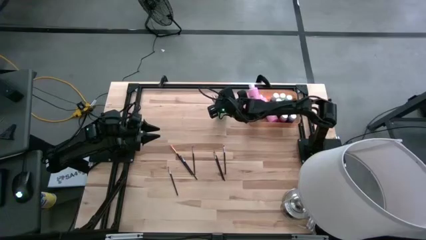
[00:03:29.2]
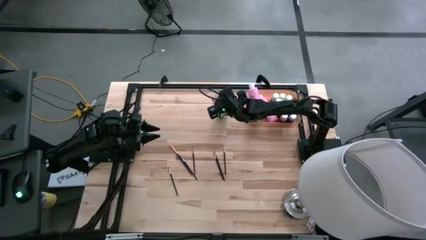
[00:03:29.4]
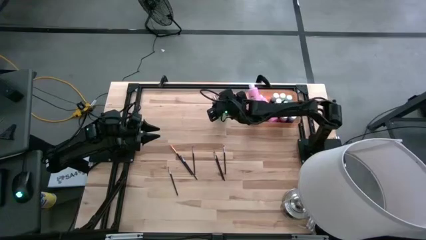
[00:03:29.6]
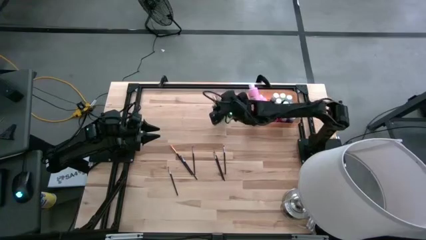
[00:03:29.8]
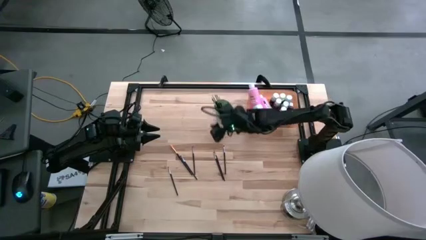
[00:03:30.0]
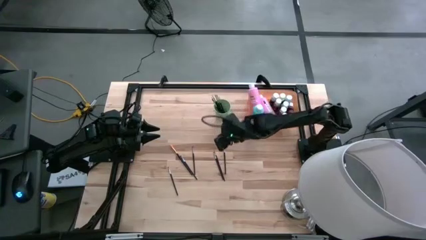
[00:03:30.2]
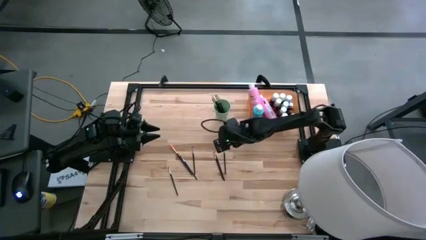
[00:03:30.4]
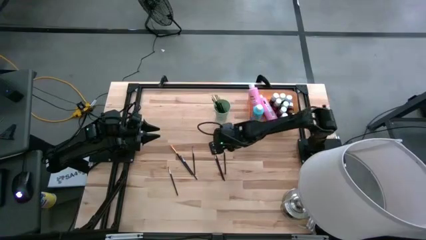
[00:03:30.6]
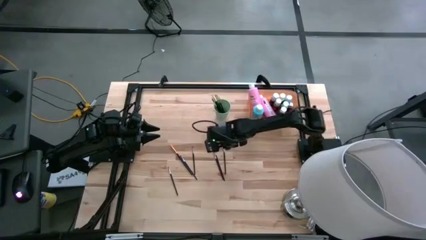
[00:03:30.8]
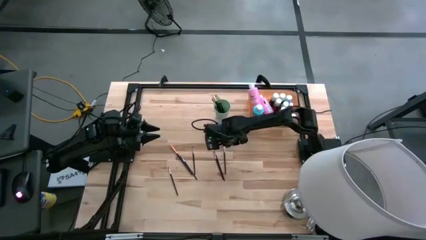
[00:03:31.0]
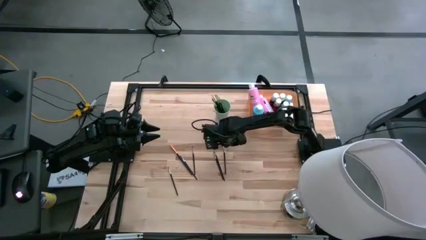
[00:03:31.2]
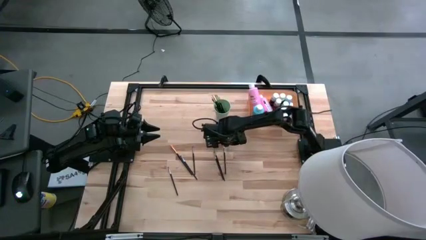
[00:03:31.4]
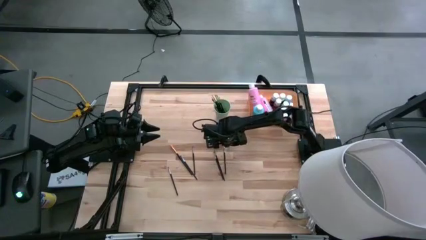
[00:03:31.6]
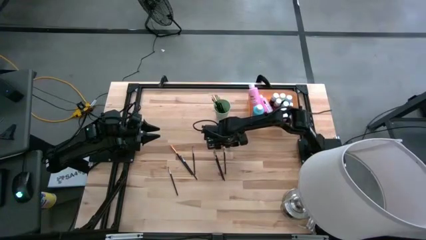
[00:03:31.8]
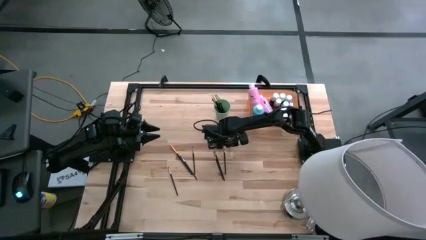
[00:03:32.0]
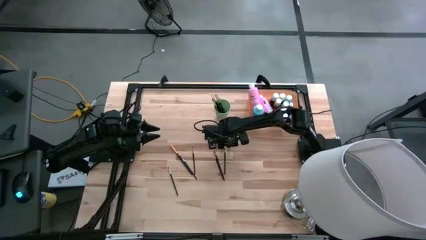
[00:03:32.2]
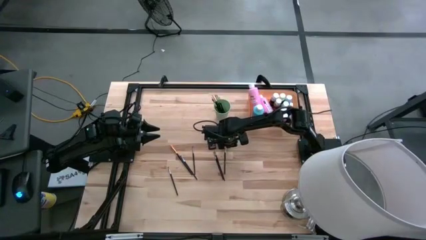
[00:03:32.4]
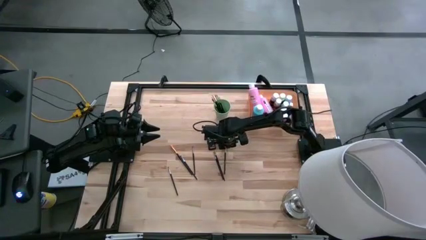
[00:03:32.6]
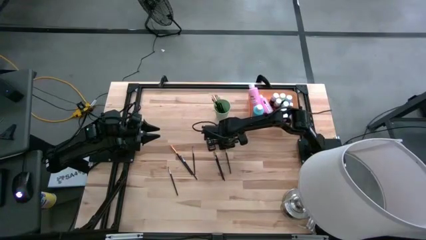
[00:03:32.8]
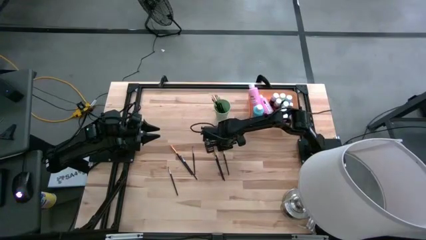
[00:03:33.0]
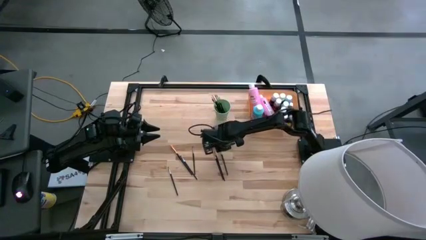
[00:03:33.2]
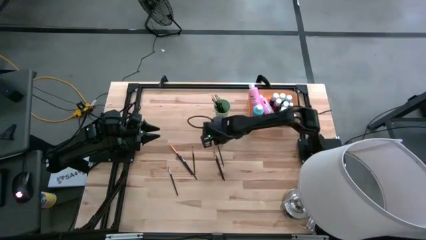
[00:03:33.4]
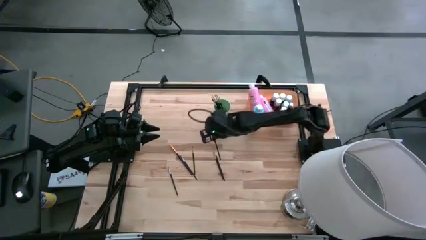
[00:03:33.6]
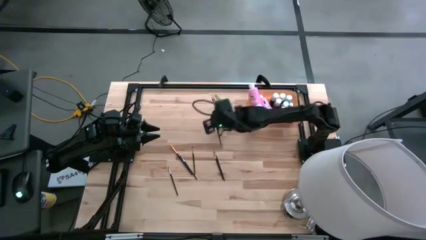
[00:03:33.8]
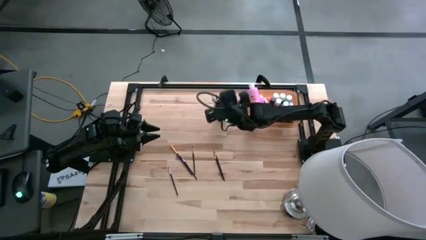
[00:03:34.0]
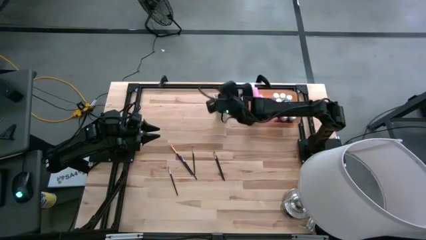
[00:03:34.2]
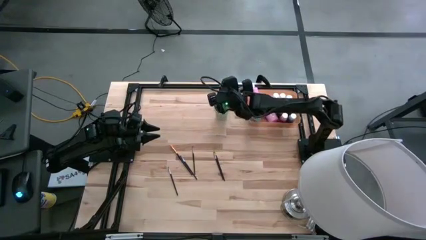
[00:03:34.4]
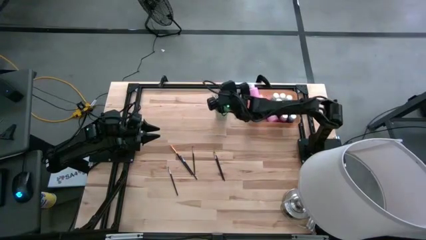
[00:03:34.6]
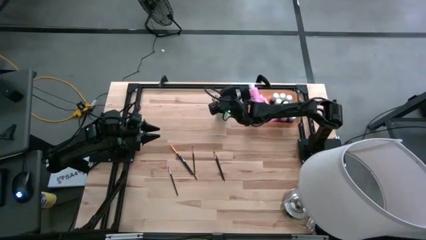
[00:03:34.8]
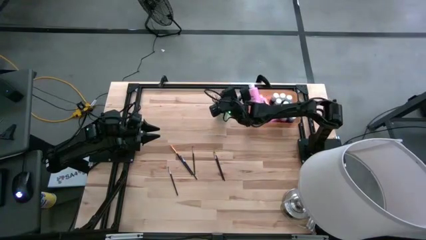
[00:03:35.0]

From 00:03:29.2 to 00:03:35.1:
Task: Pick & Place Paint Supplies
Put the silver paintbrush into the green cup

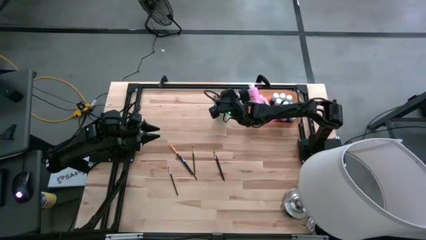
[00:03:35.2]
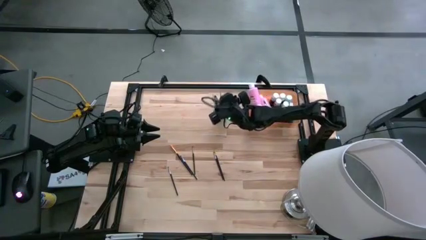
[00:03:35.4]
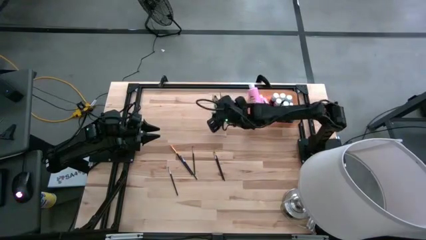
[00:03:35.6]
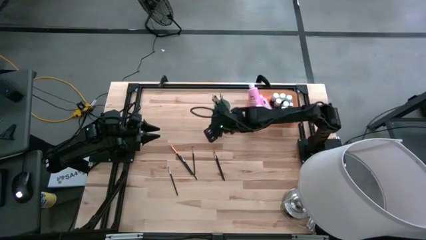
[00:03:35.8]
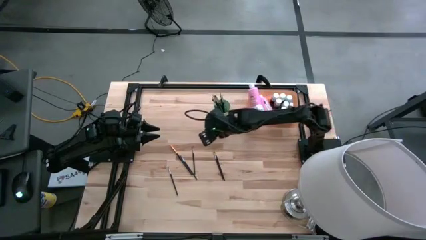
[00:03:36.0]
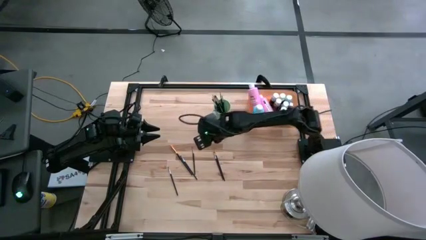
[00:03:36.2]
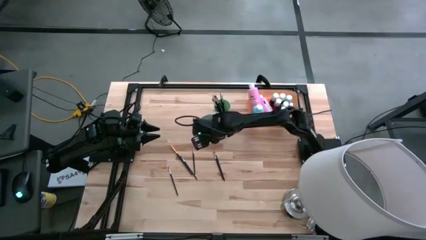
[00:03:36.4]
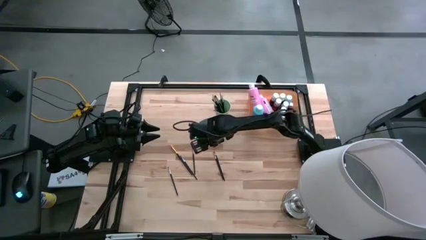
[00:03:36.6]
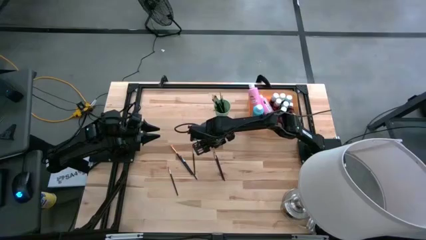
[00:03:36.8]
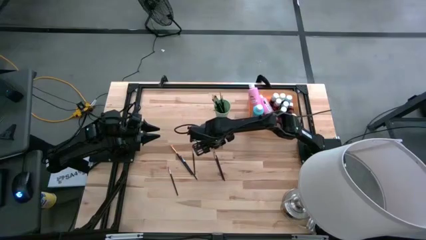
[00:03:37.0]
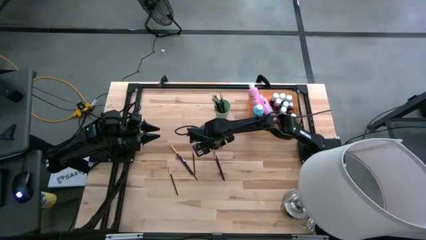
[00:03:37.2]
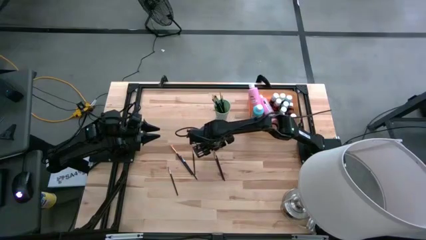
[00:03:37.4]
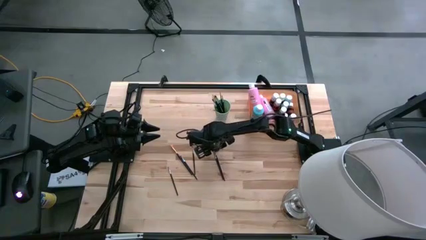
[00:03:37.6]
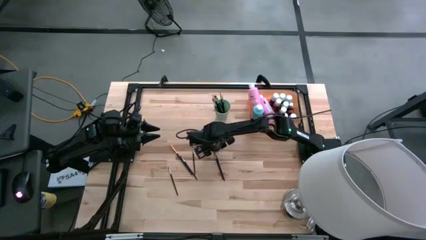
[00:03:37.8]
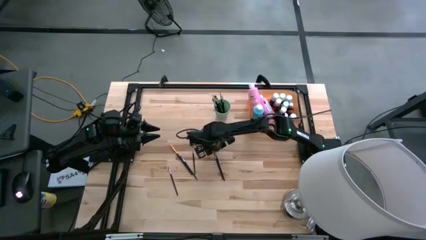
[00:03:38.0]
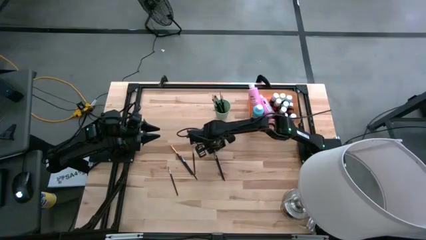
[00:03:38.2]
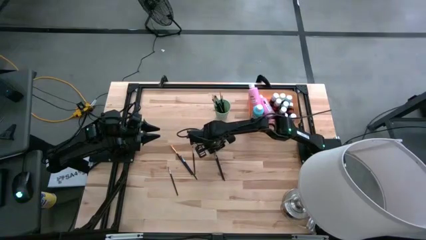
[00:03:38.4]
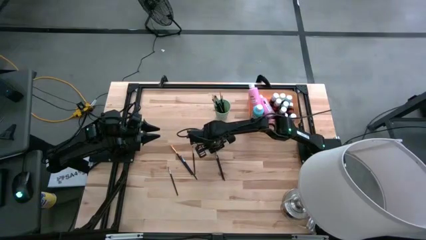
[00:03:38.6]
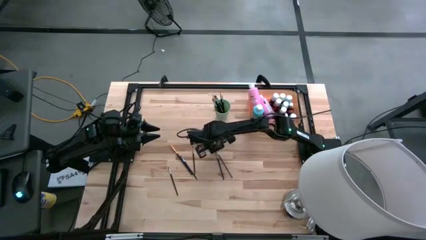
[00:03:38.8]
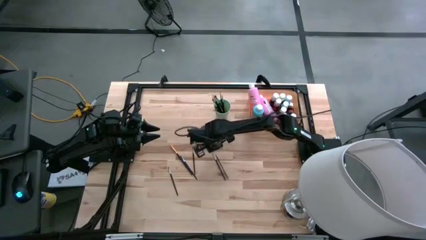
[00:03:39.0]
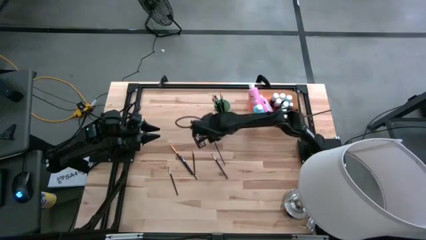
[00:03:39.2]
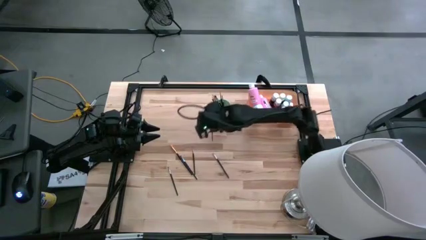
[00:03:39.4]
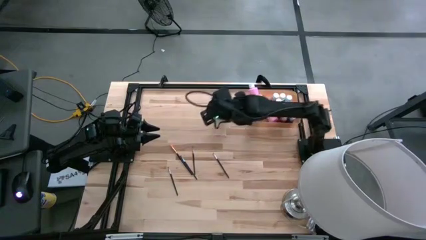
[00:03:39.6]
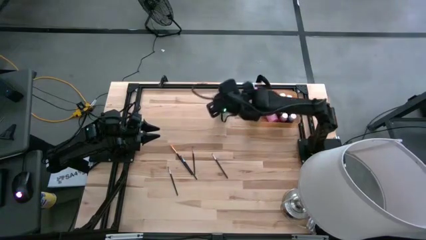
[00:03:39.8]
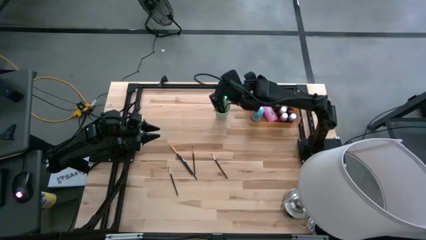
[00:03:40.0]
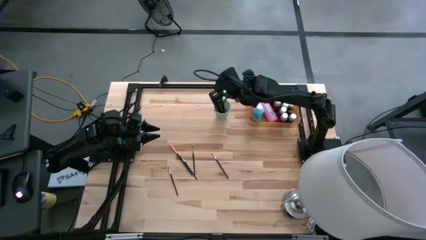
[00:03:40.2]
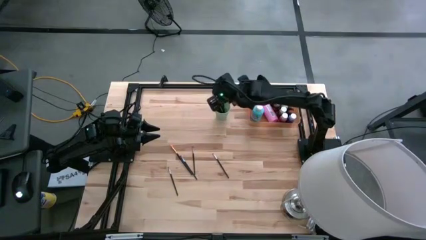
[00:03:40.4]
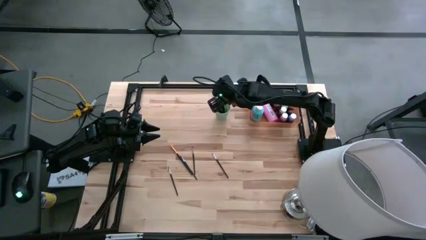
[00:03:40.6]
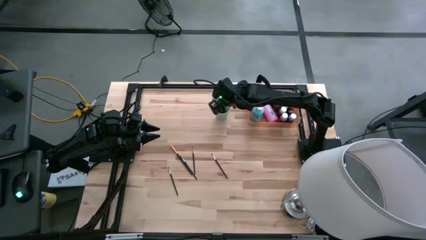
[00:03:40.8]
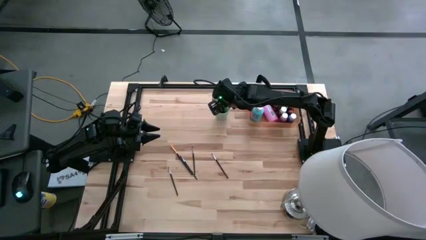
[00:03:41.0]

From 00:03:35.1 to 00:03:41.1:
Put the right gold paintbrush into the green cup
